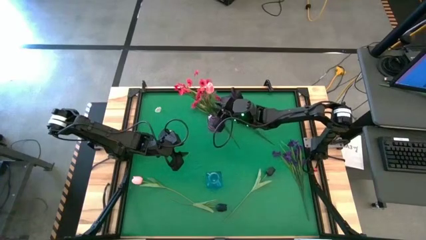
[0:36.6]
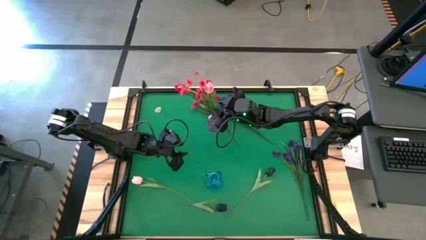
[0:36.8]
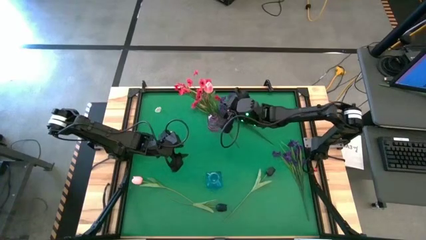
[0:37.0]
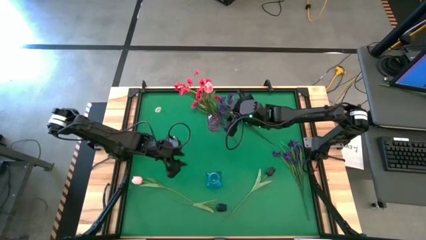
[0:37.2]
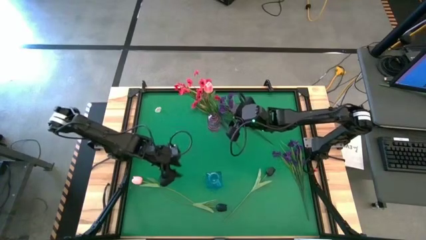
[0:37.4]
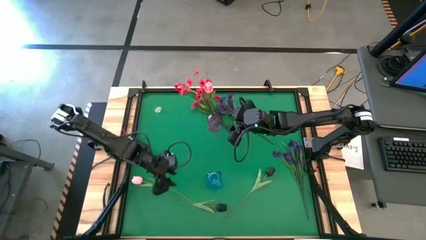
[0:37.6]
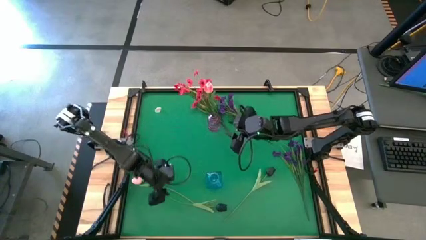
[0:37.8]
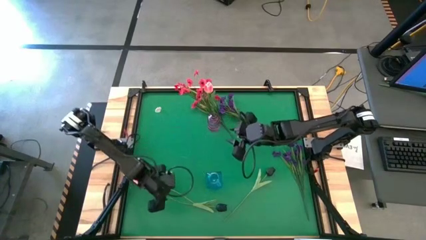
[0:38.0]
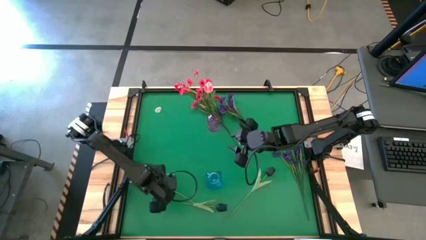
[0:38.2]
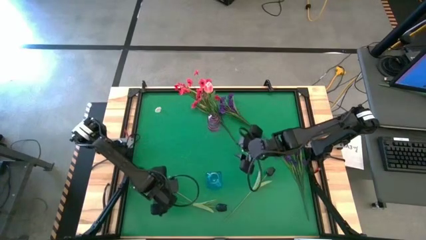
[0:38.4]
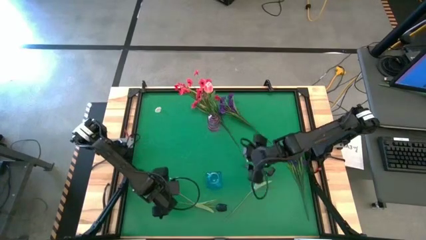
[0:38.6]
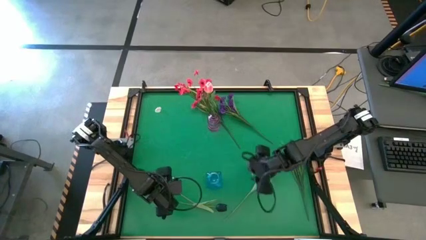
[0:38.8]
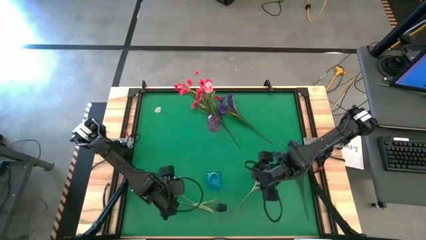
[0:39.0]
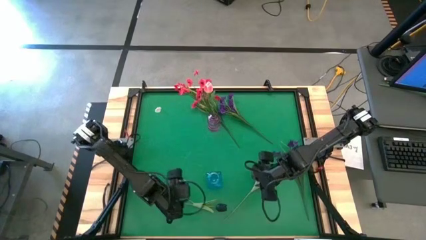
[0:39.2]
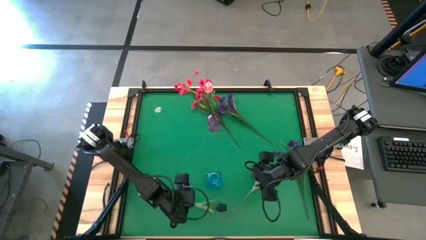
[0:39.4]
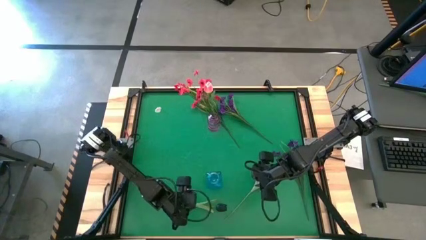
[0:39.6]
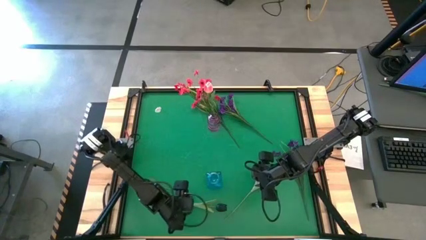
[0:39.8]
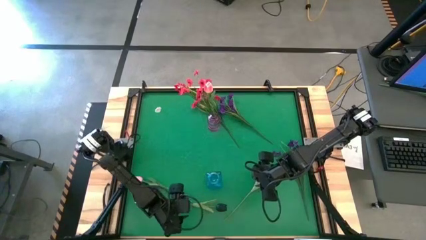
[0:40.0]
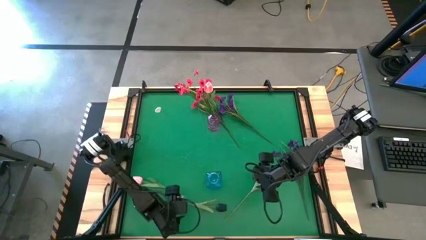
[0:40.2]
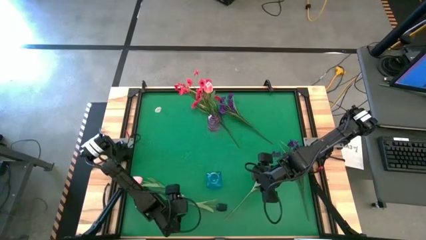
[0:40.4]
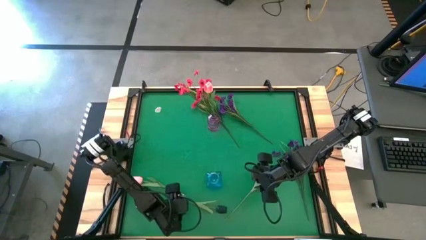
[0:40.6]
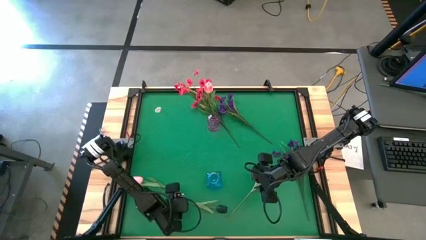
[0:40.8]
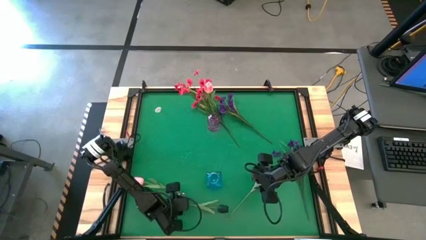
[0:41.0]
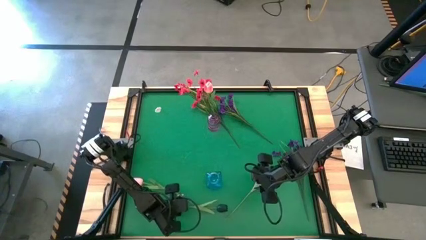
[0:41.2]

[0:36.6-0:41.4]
Task: Sort flowers into vase by color
Put the left black tulip into the blue vase

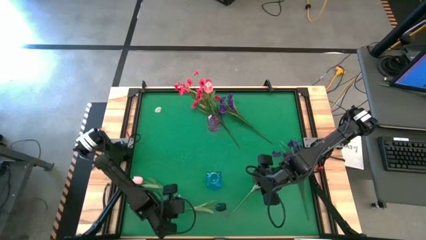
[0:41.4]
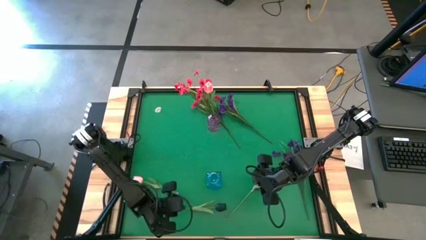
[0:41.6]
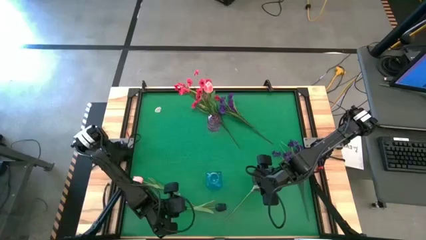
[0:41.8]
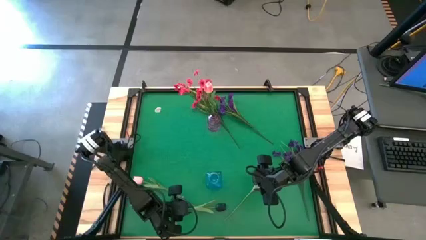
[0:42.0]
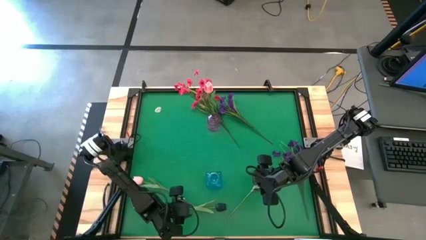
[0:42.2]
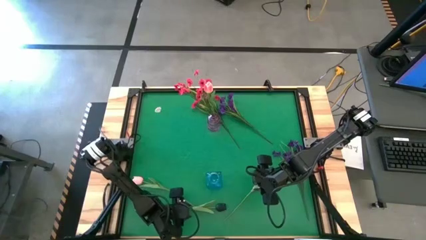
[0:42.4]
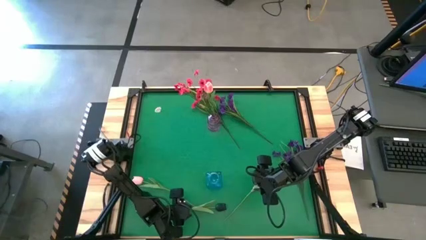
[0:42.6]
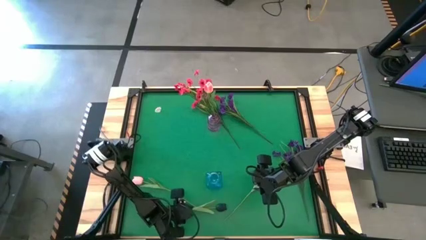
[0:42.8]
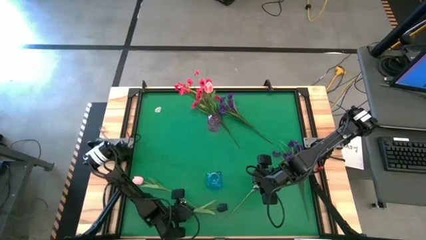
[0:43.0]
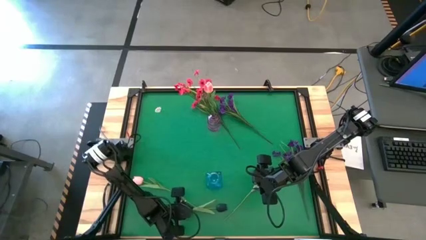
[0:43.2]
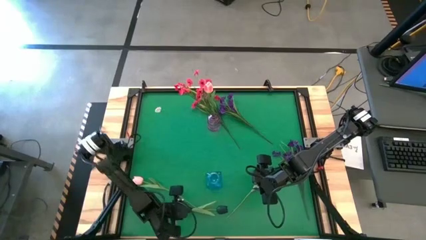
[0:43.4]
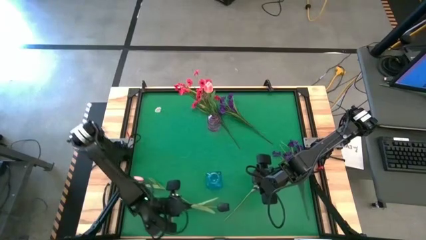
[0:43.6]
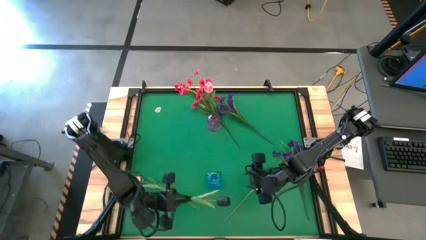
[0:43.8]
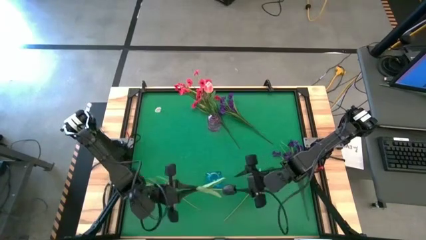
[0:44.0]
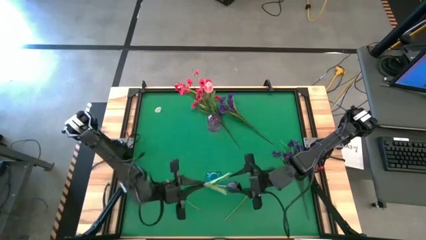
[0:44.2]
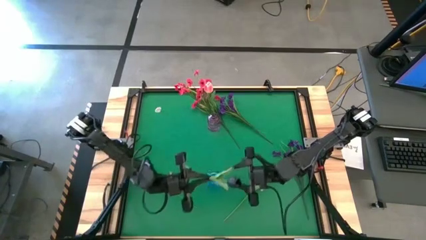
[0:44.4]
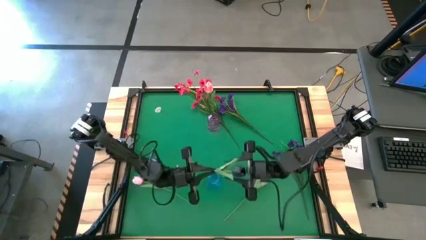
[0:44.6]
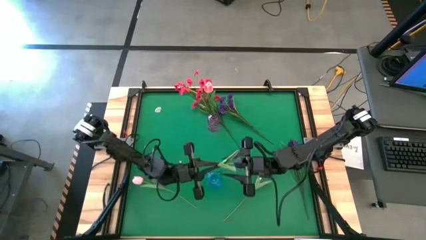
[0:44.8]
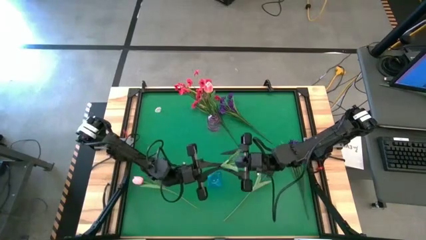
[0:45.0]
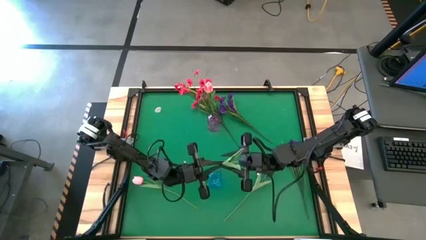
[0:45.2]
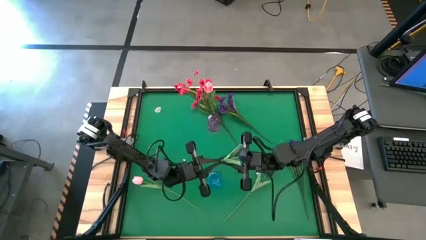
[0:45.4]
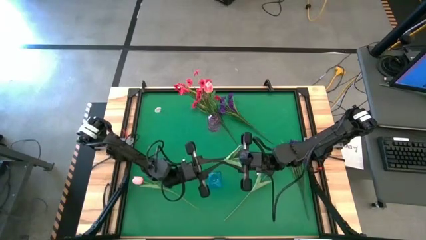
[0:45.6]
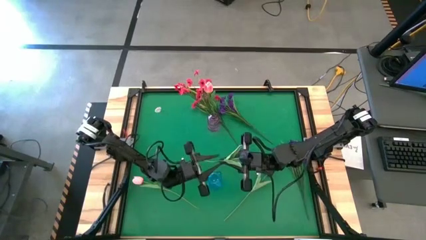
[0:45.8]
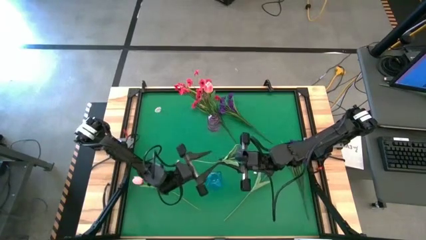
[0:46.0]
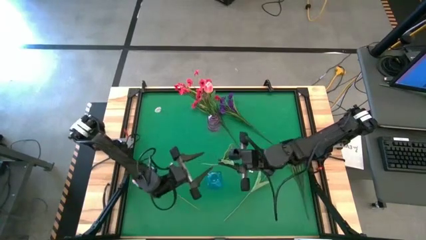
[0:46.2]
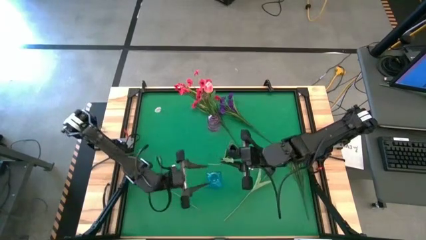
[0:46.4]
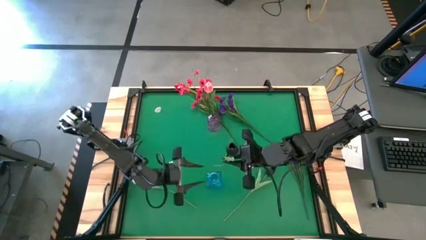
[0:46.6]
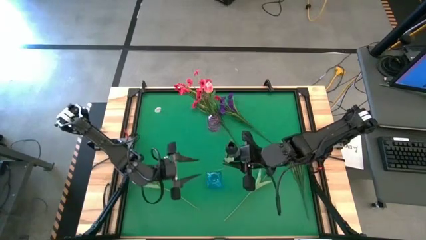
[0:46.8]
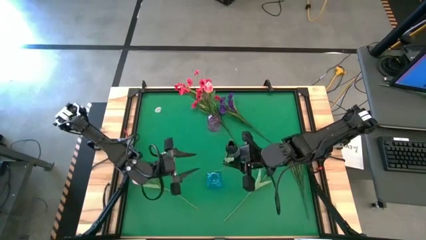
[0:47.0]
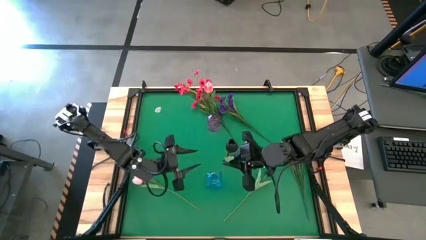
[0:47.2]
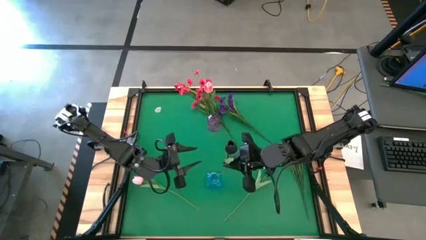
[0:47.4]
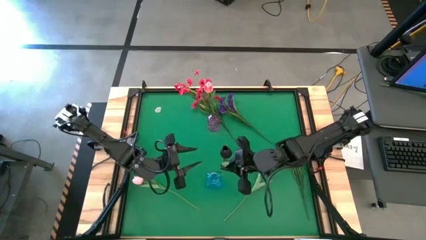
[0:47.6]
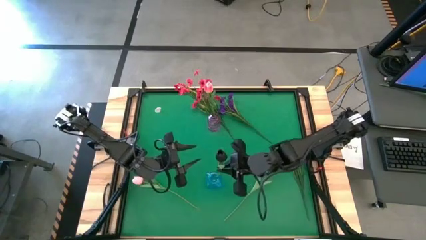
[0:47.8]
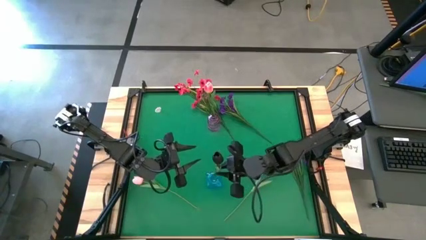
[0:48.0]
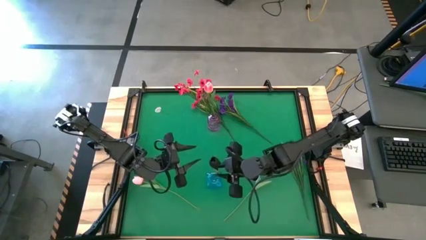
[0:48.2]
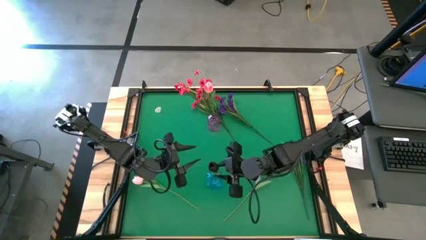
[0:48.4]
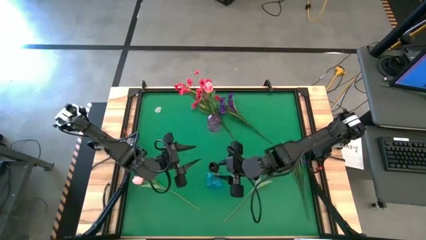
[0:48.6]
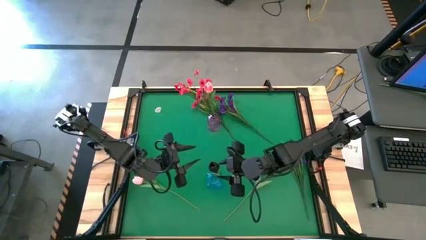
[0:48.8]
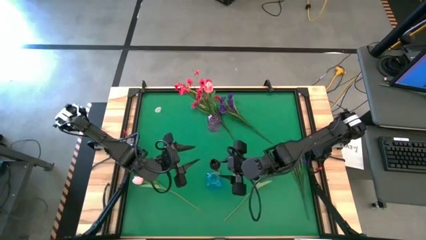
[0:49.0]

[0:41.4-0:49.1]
Put the left black tulip into the blue vase

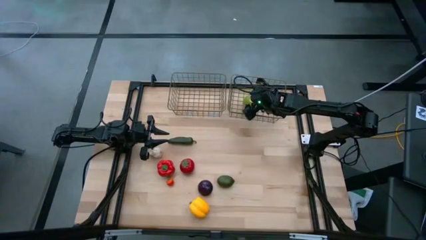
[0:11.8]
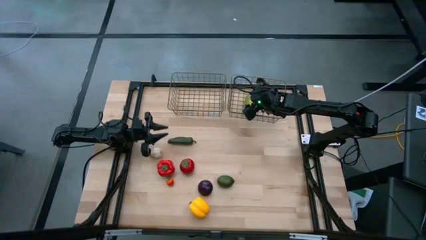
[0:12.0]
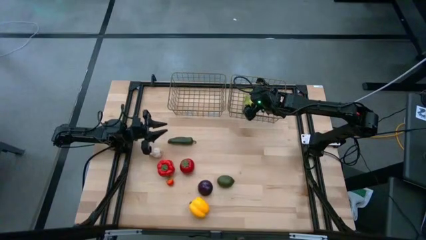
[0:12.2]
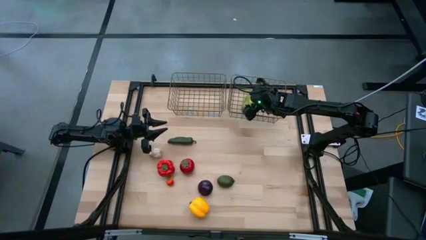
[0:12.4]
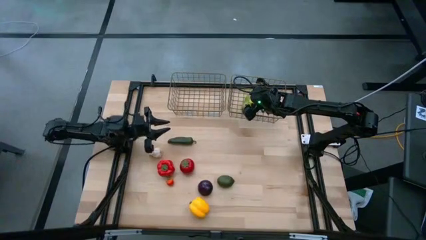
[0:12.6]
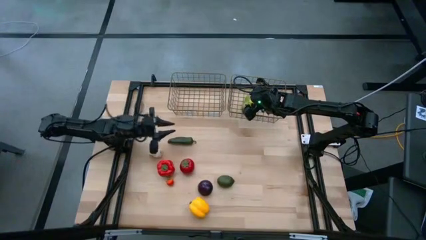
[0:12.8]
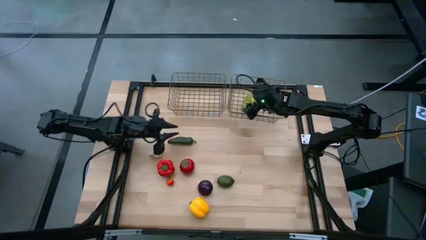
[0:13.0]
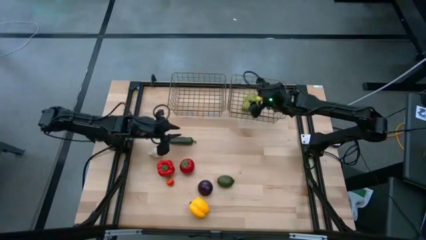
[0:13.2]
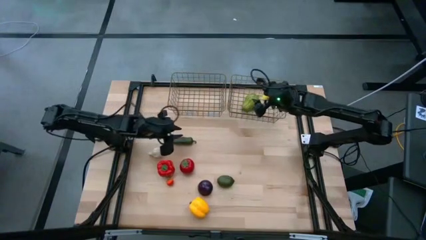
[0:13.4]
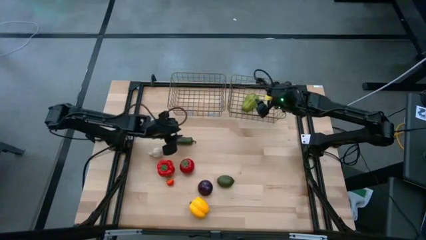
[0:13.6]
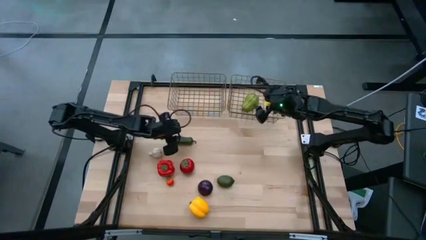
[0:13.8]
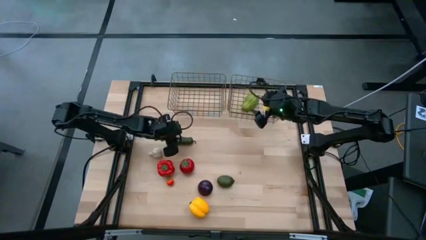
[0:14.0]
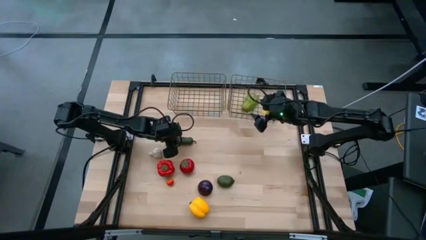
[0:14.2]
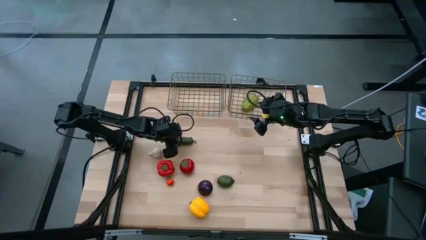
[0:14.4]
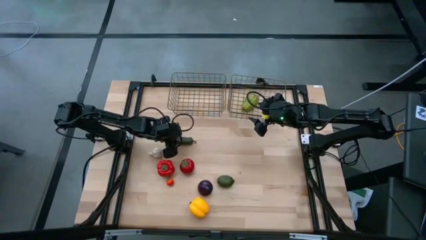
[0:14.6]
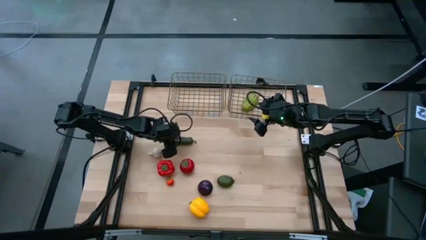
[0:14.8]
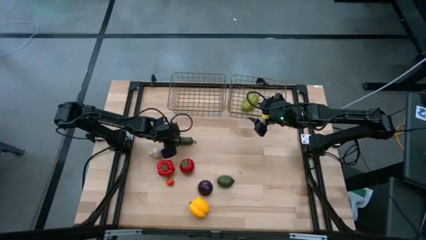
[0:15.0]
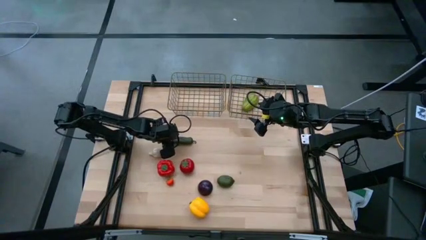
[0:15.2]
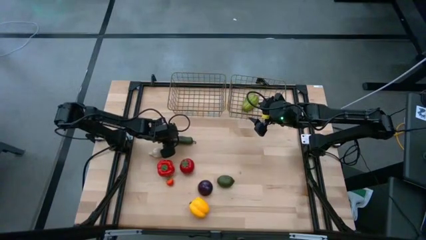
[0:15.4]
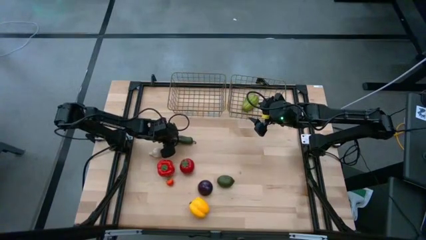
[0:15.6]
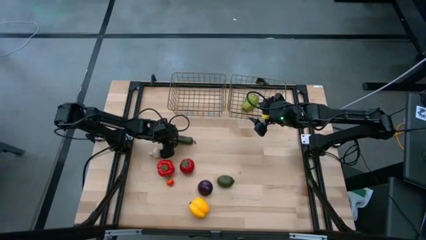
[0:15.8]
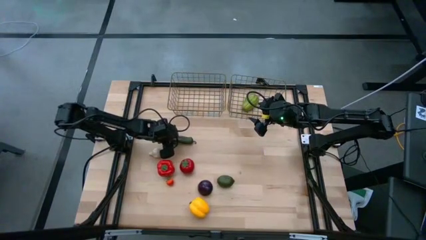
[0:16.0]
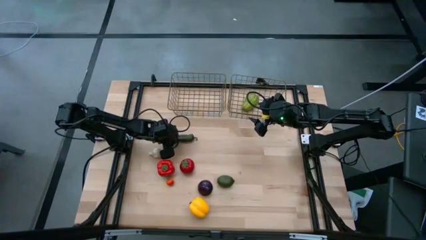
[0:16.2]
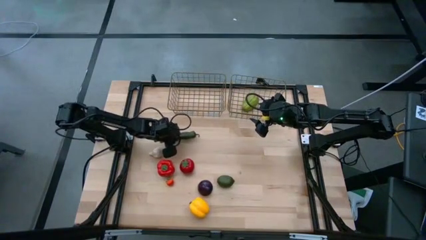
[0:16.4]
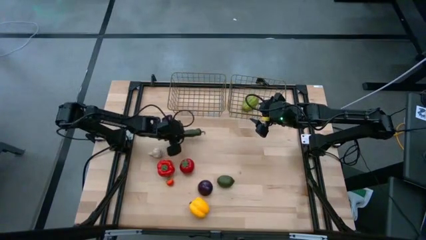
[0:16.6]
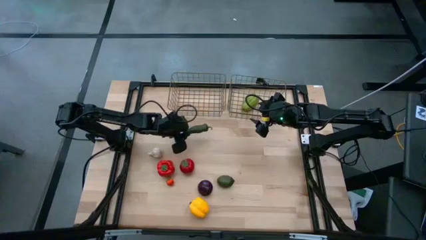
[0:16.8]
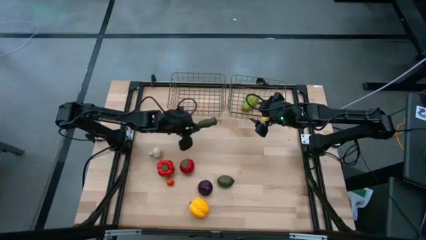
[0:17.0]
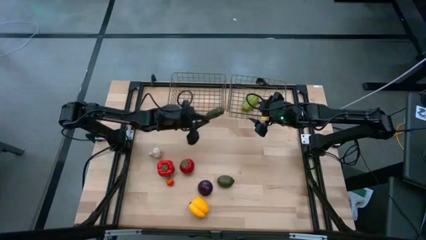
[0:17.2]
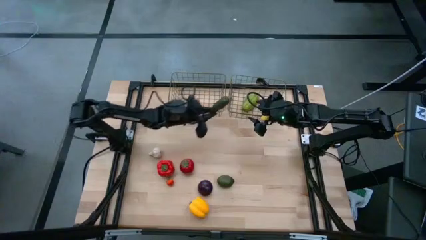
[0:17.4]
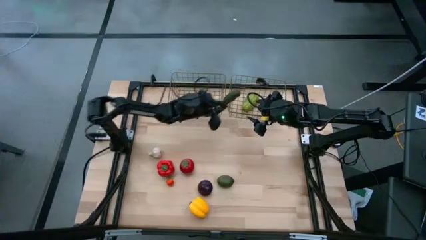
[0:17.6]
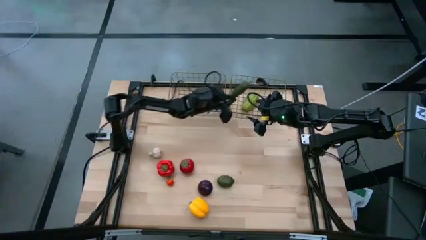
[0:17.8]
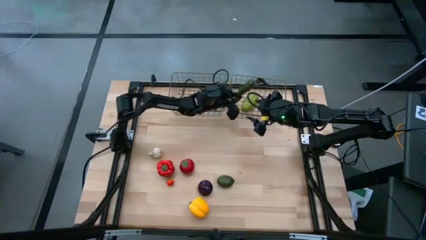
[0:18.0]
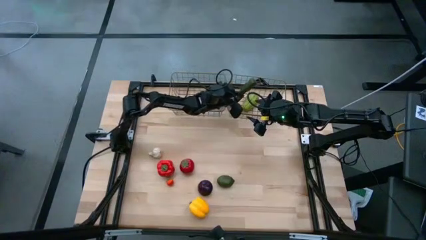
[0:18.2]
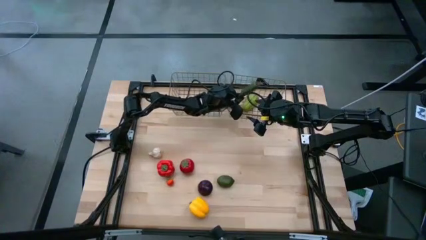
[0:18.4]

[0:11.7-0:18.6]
Task: Sort produce into baskets
Put the green pepper into the right gold wire basket
